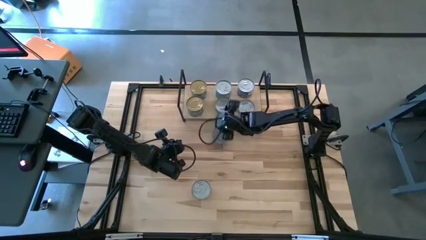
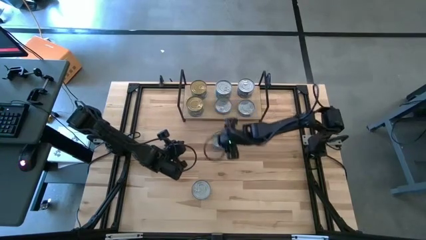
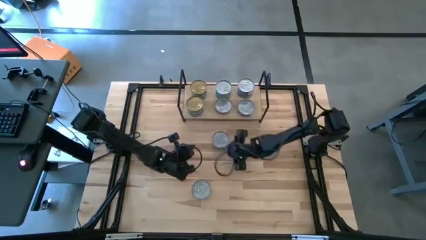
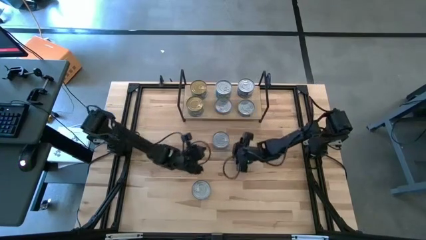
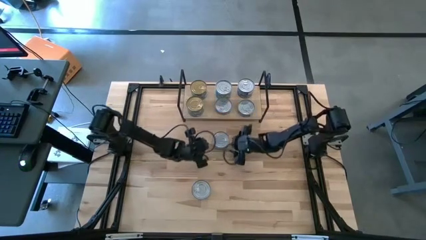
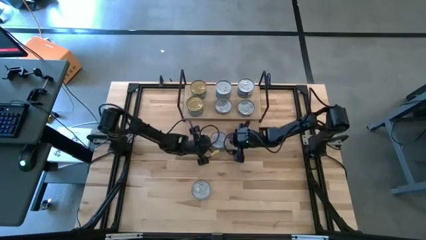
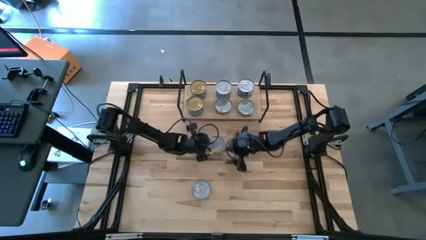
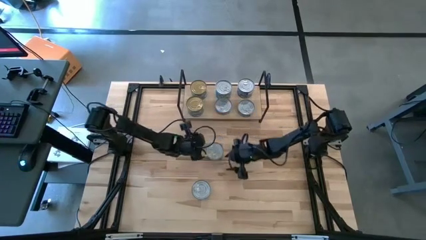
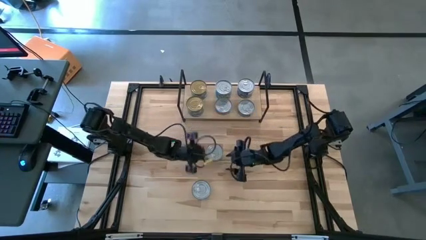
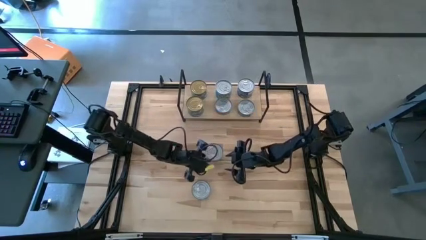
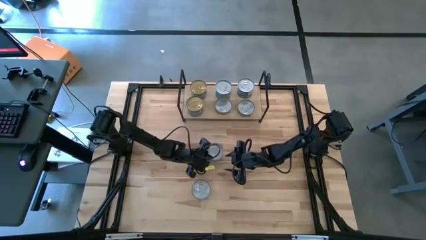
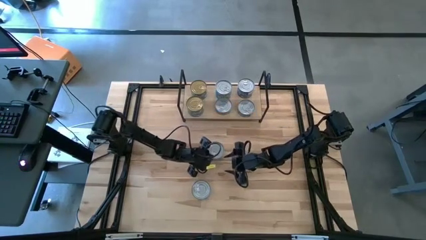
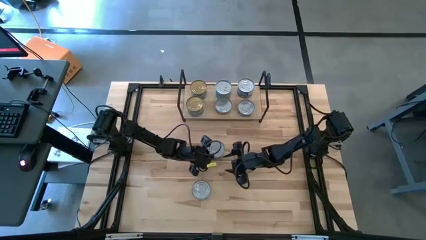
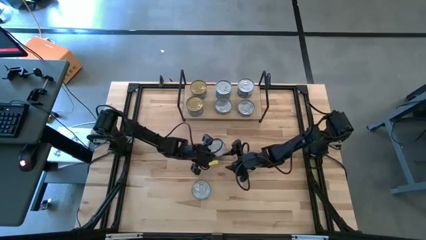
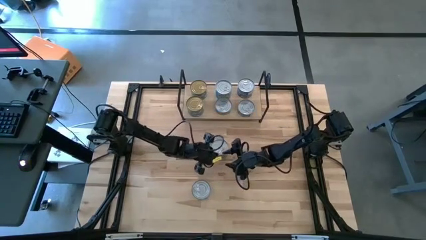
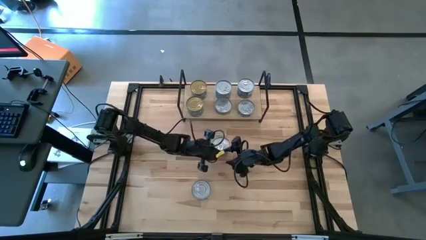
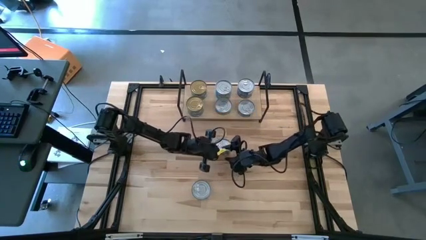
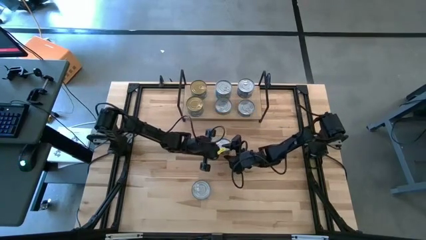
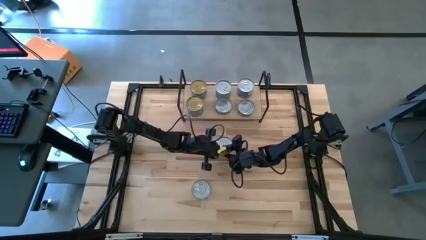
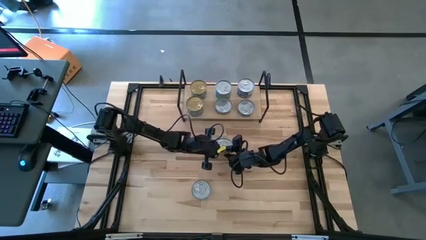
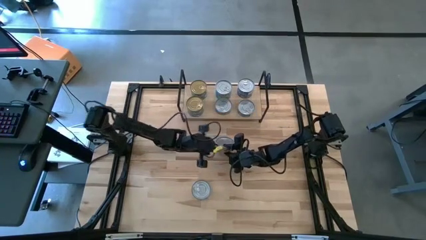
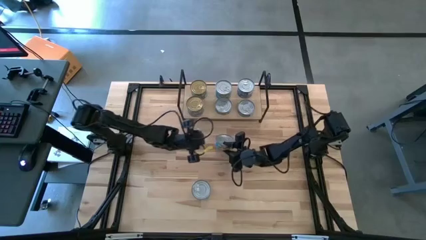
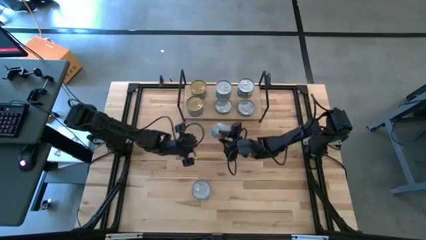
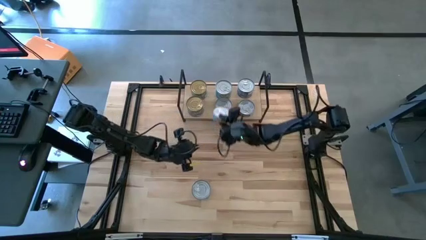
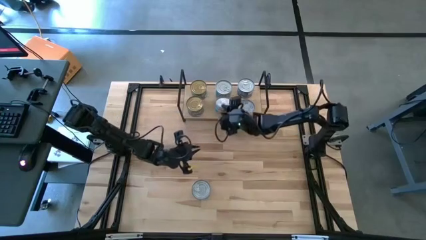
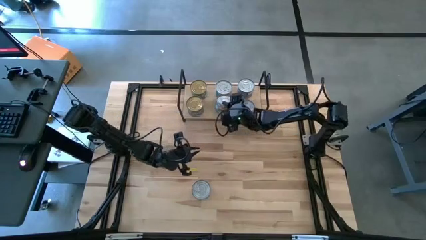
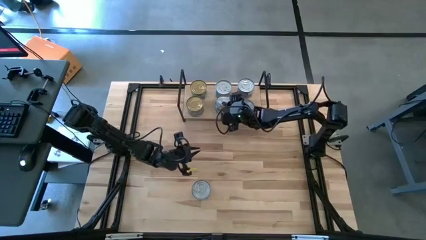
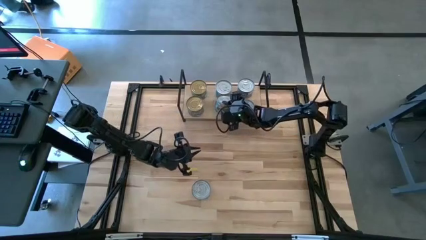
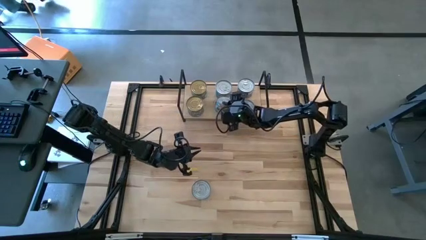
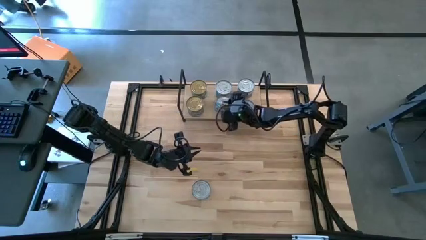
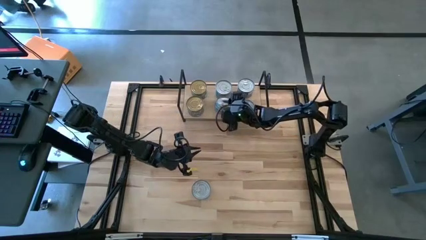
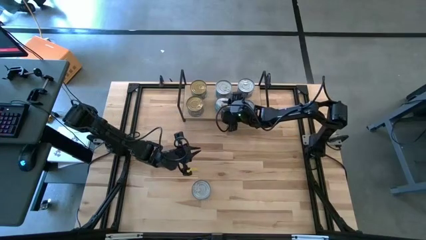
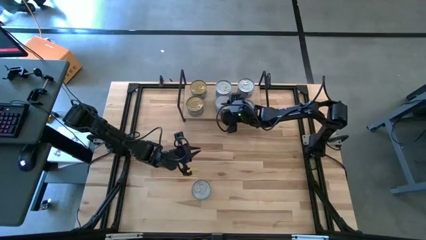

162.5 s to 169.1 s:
Task: Stack canned seafood by type on shelf
Stack the light blue tuna can on top of the light blue tuna can on the shelf

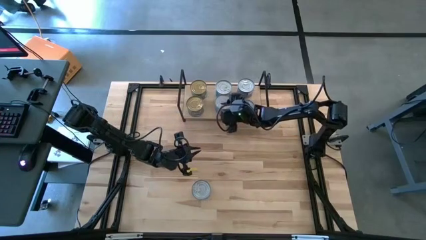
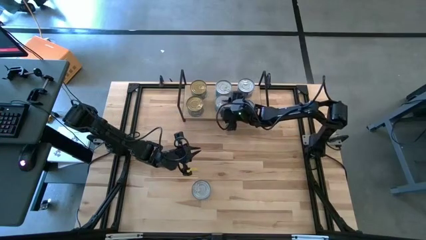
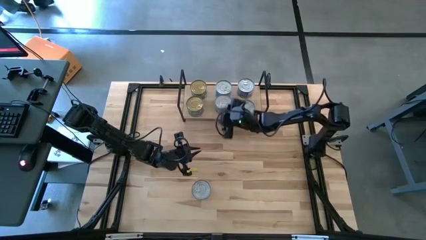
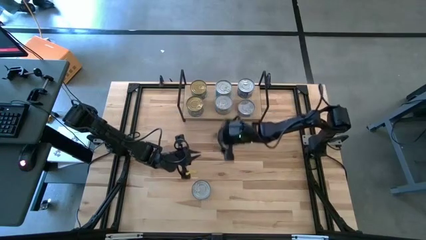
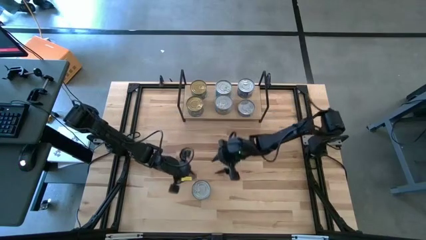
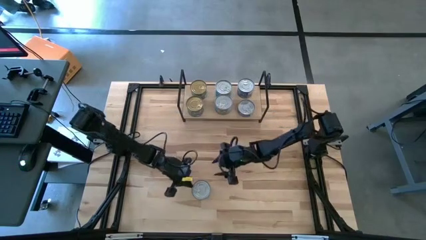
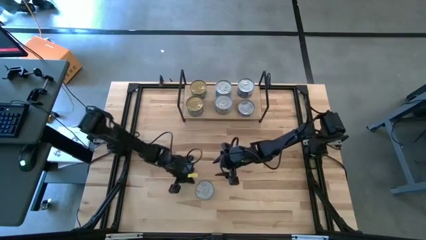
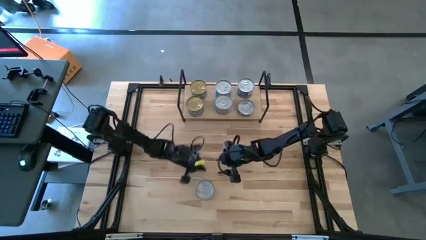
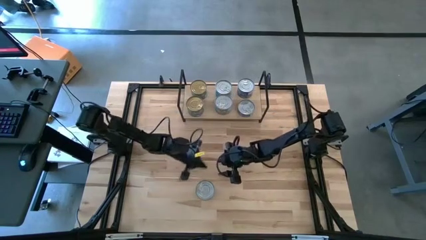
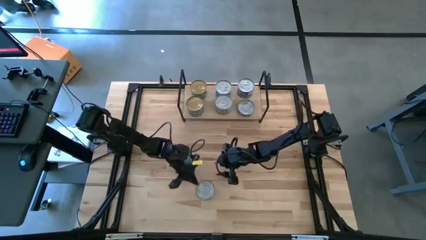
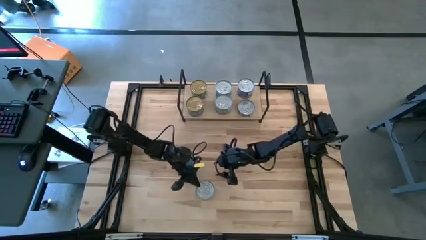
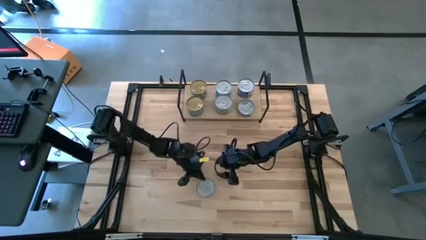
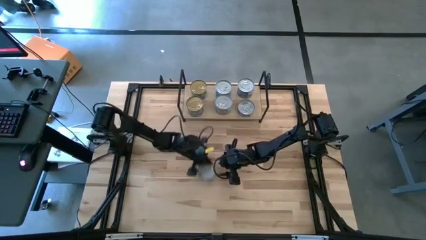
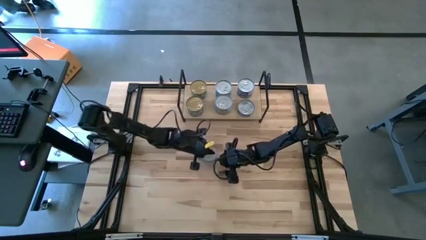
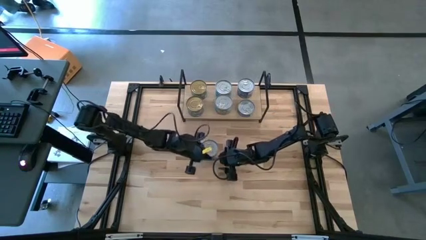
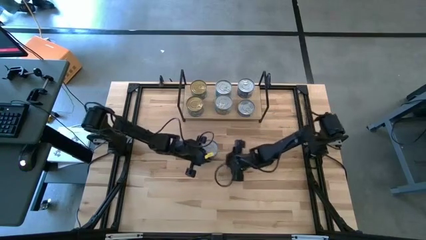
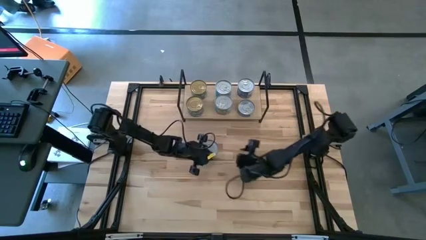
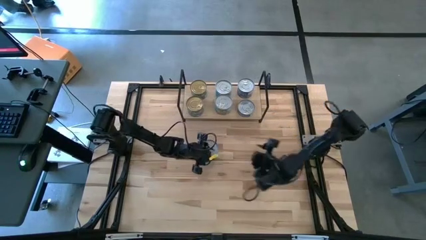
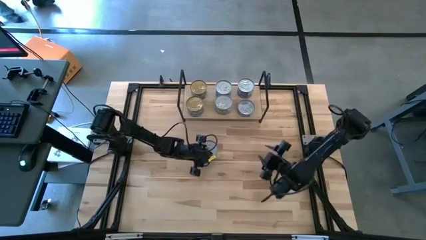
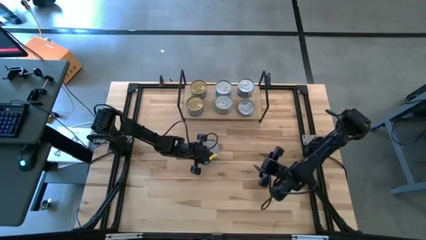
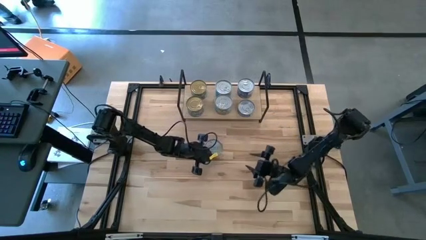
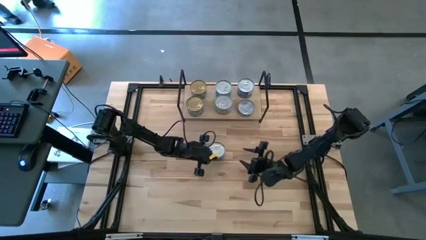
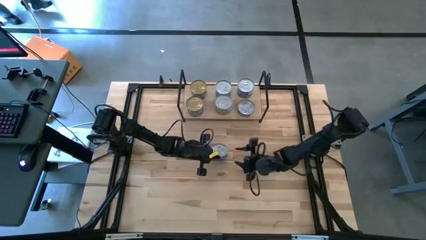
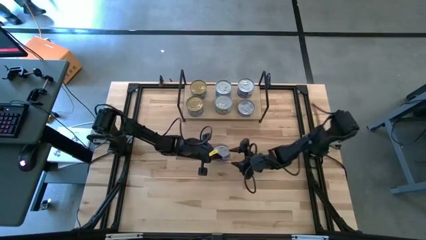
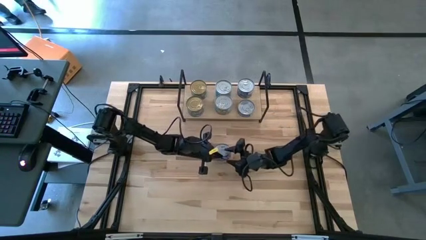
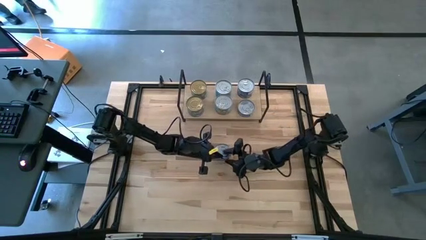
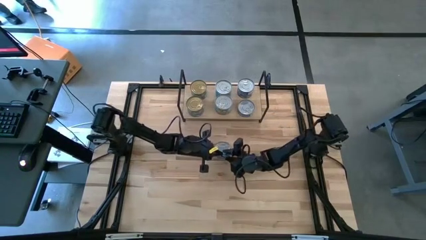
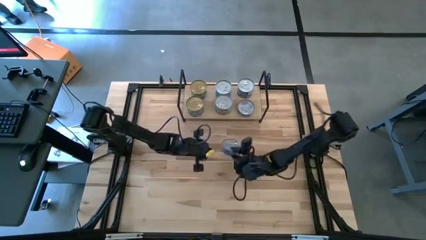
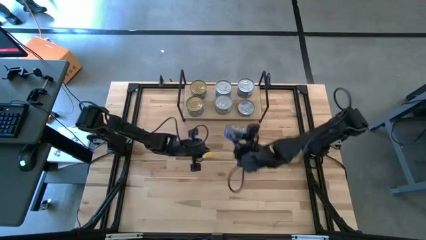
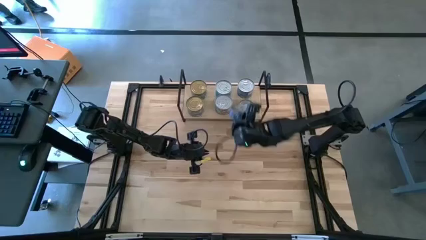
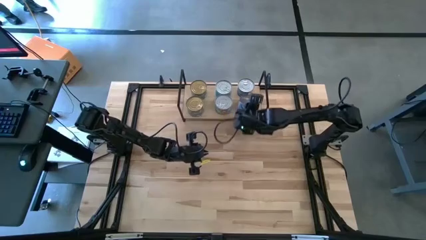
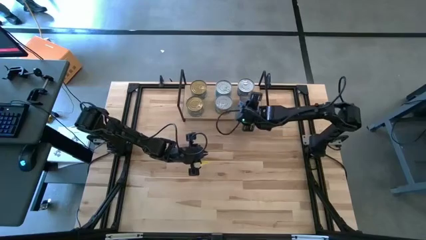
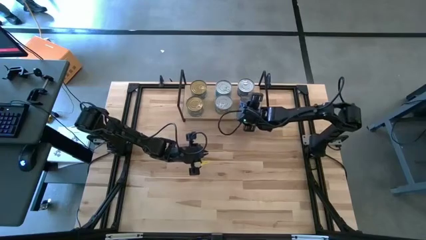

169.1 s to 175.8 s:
Stack the dark blue tuna can on top of the dark blue tuna can on the shelf
